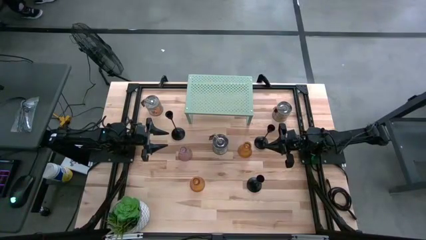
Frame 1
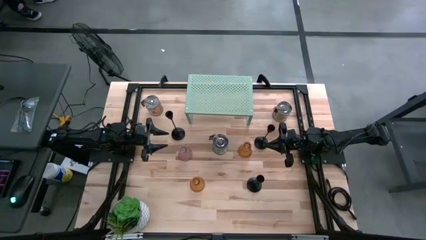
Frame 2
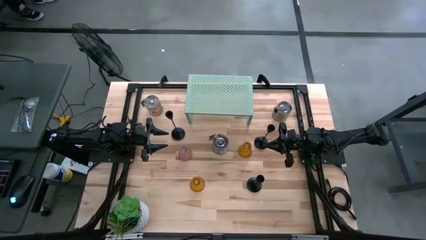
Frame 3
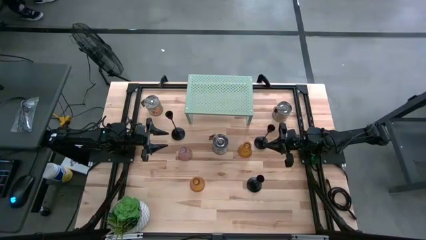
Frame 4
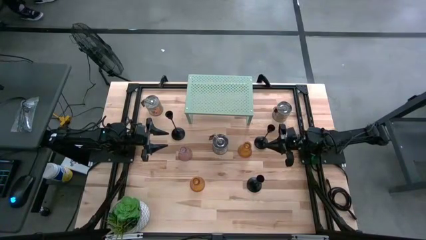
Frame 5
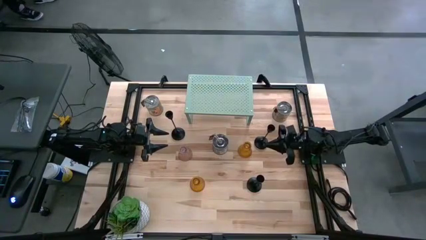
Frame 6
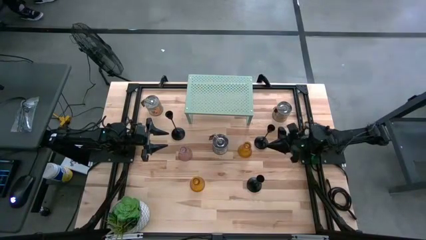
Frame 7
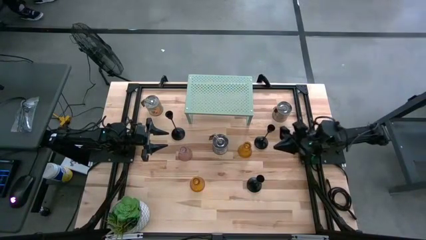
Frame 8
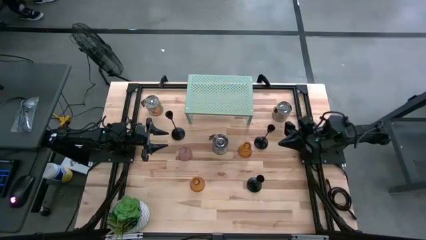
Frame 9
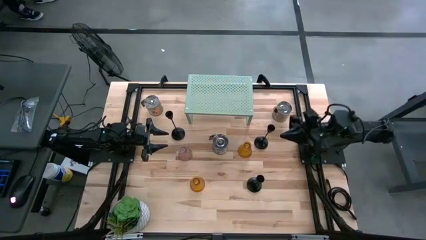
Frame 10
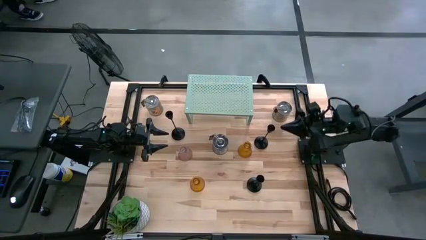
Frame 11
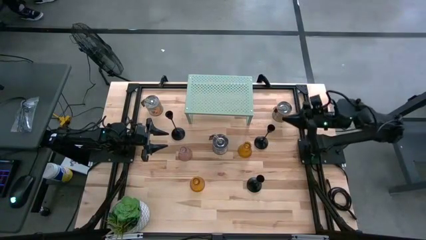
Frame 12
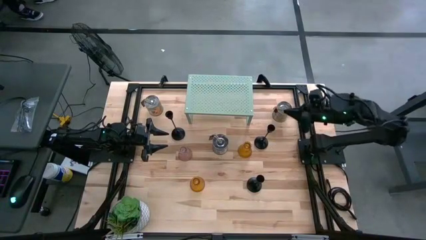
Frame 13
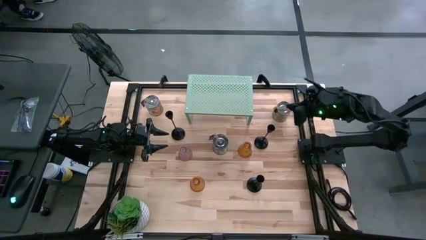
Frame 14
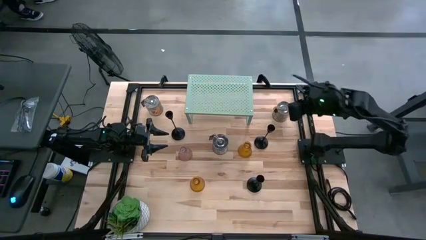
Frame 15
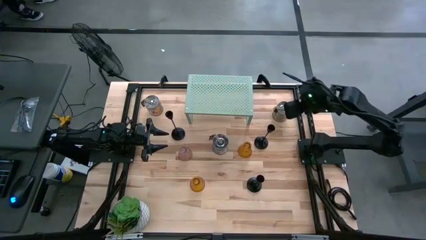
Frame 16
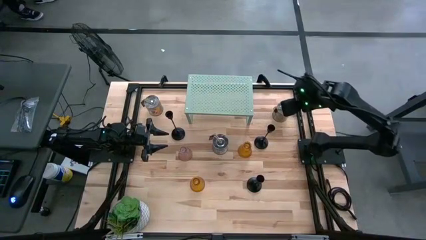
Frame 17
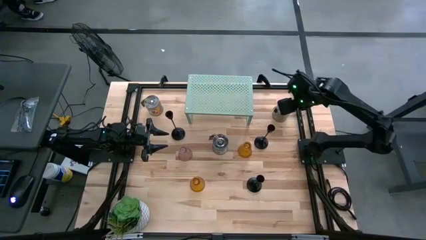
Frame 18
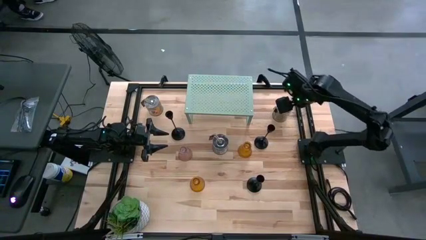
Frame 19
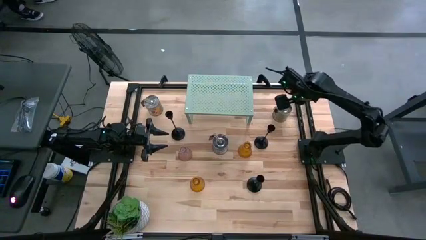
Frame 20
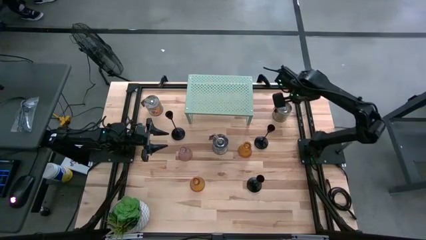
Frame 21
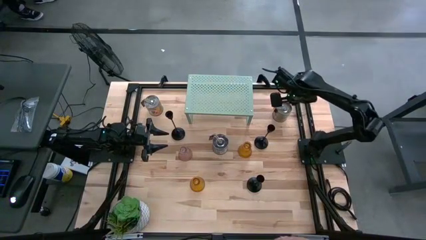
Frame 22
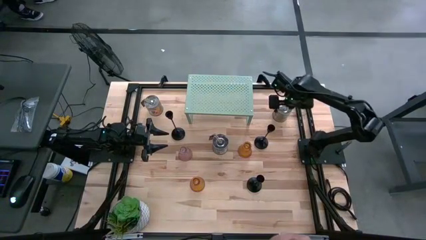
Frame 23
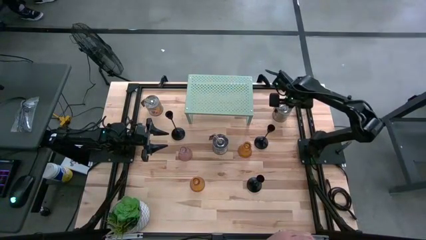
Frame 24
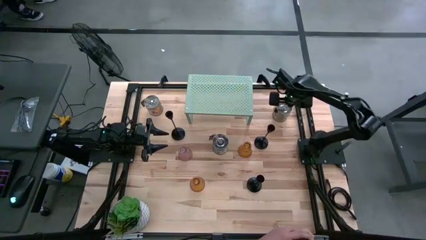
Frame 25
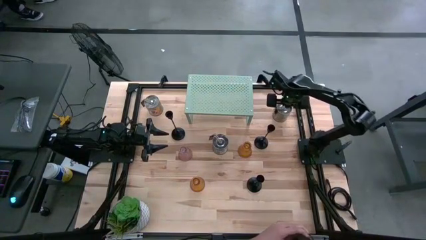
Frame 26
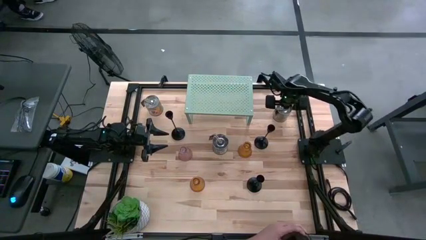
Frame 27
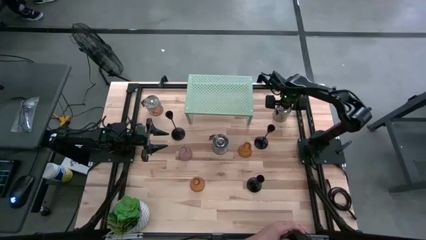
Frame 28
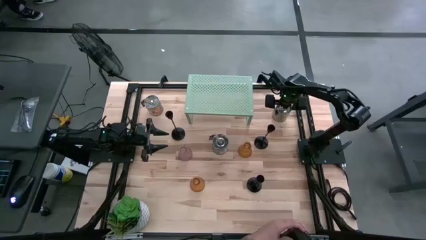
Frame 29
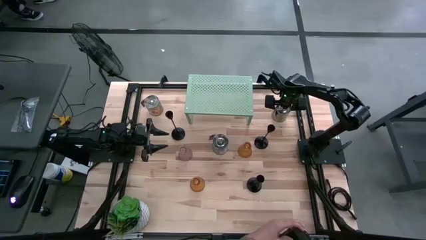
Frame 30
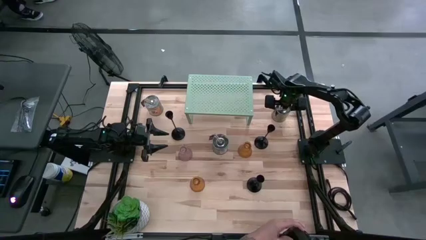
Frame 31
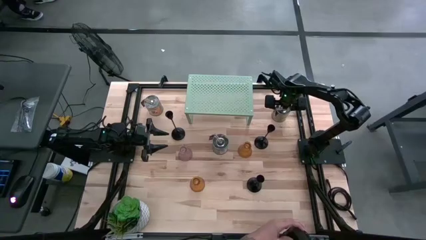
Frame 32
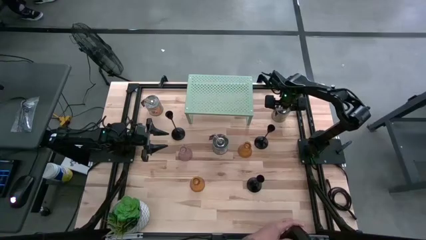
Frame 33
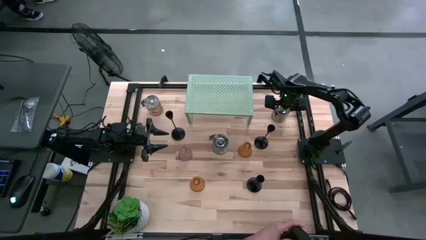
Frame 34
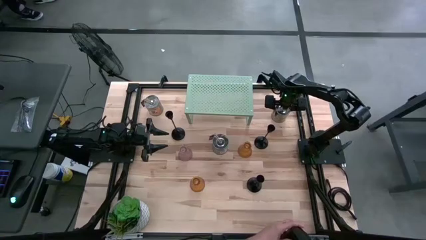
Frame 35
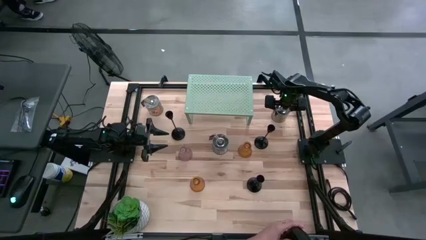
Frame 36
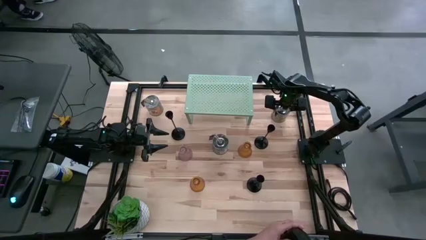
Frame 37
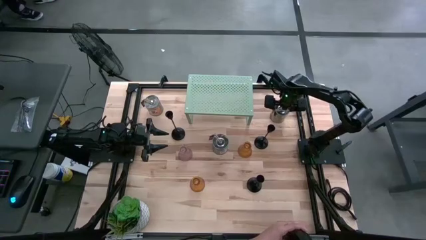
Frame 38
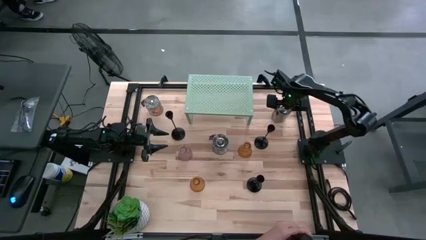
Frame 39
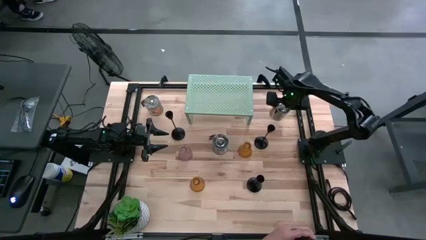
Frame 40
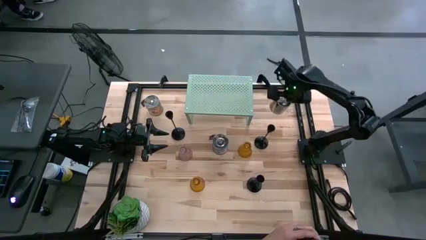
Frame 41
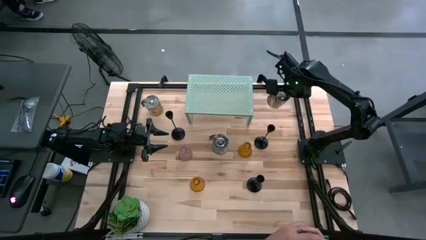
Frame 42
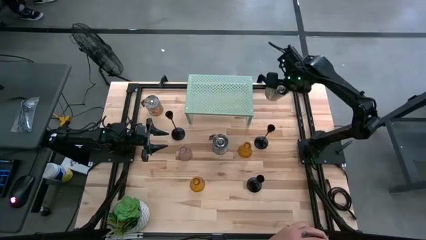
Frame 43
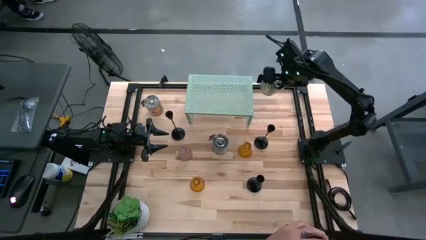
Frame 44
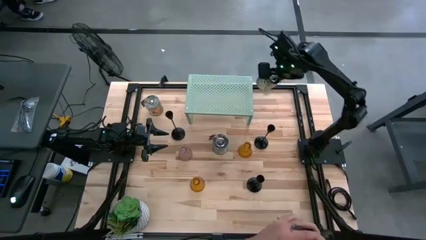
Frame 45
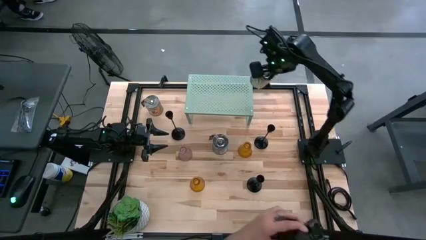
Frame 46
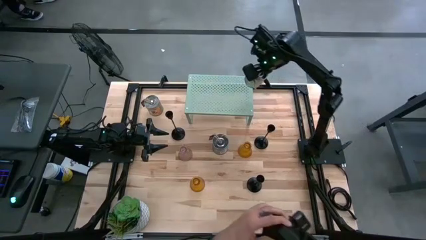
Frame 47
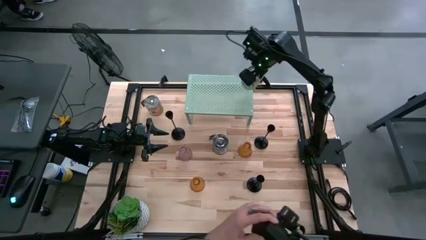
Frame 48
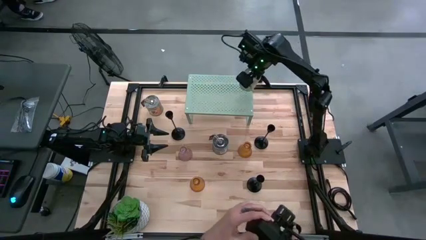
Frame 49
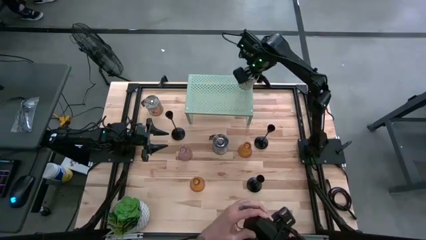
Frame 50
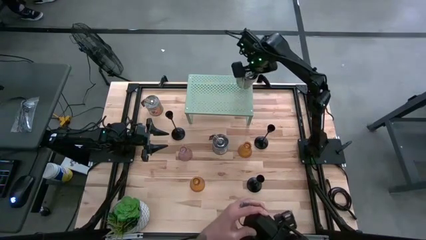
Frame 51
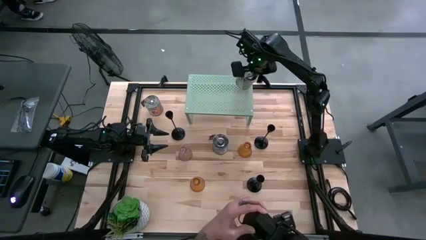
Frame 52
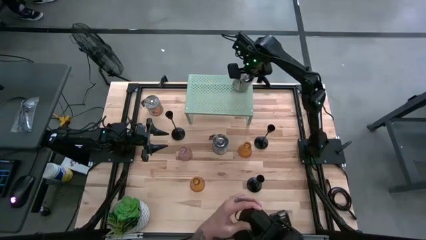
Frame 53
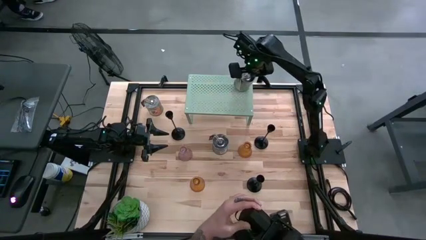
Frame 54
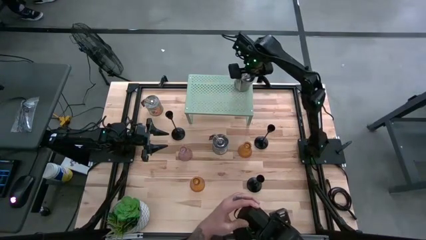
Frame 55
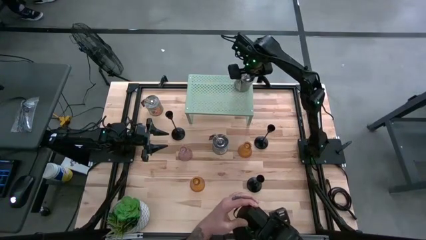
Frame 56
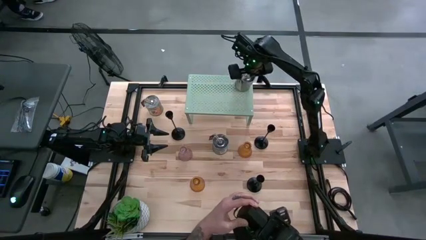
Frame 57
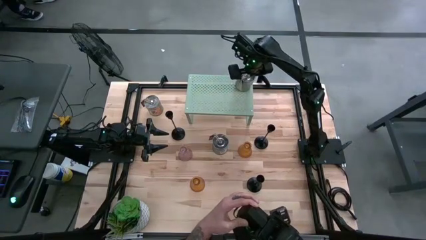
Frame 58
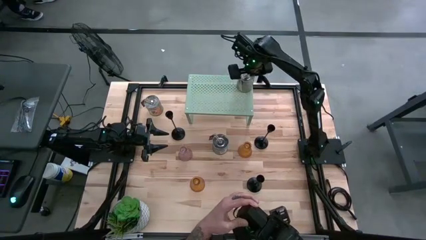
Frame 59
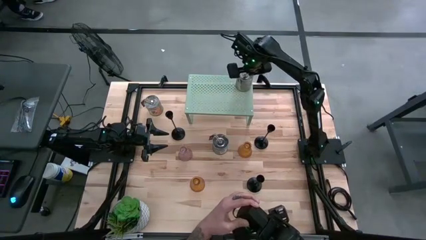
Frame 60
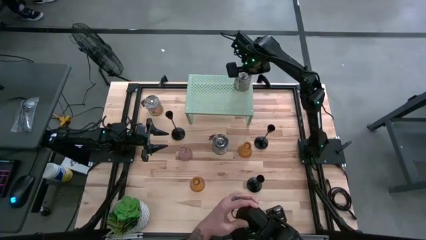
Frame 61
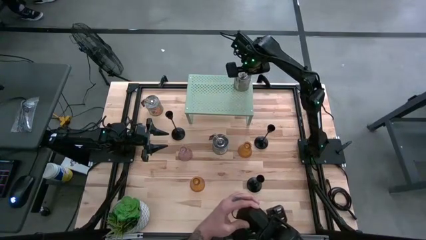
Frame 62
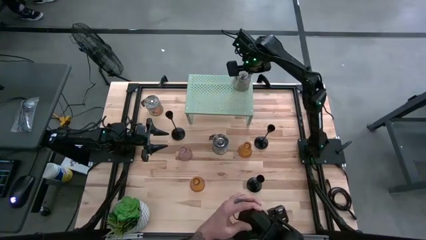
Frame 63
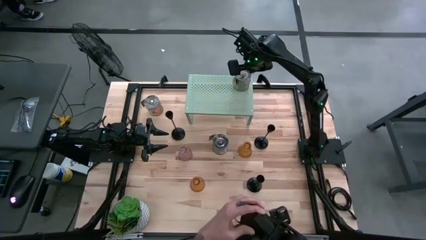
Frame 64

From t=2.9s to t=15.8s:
Task: Pick & Place candle stick holders
Put the top right scented candle on the shelf
